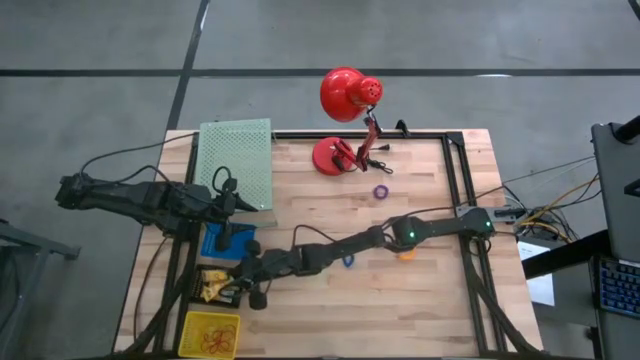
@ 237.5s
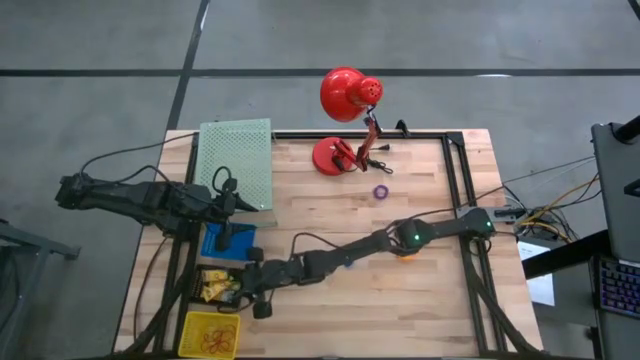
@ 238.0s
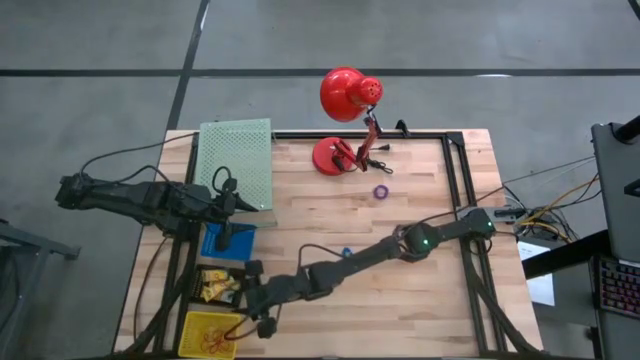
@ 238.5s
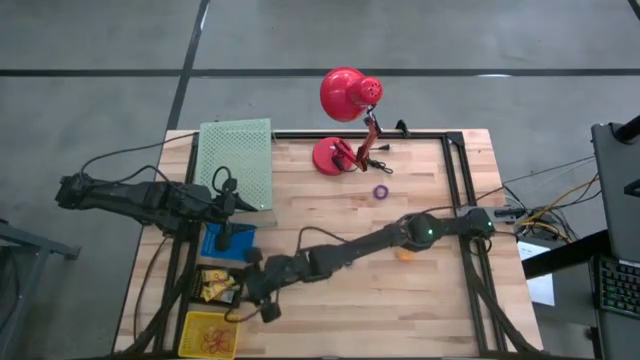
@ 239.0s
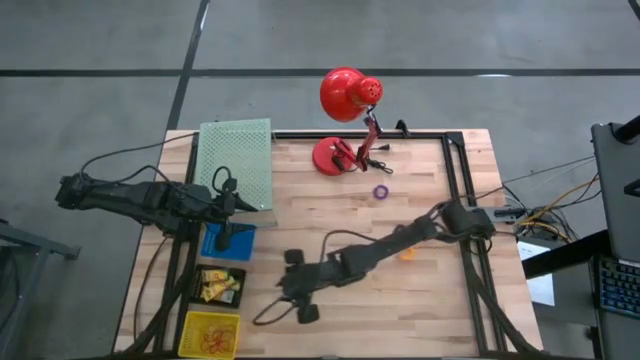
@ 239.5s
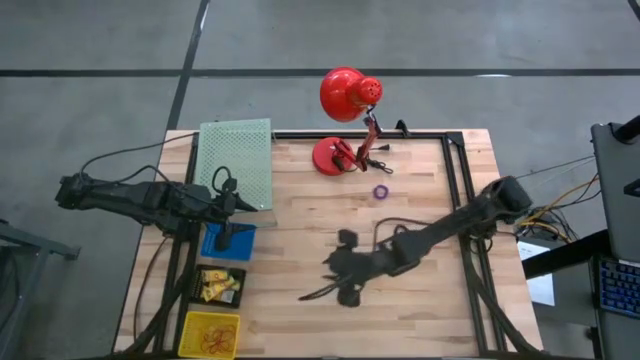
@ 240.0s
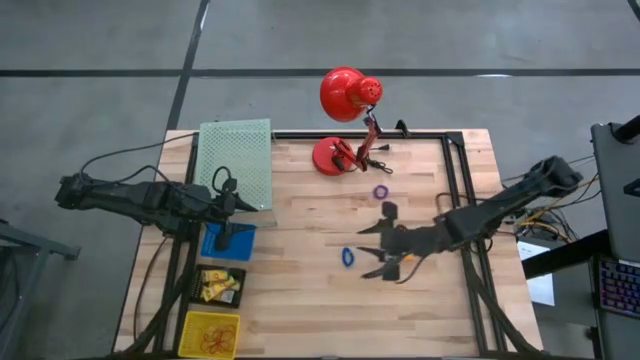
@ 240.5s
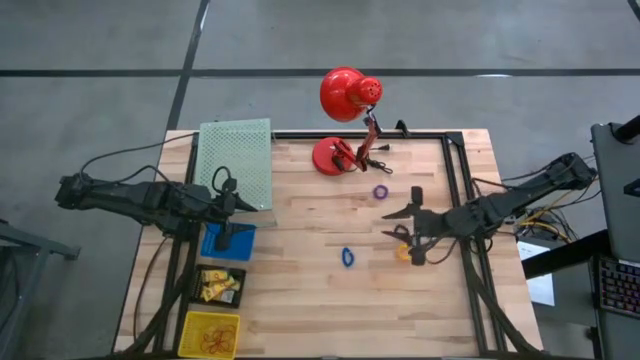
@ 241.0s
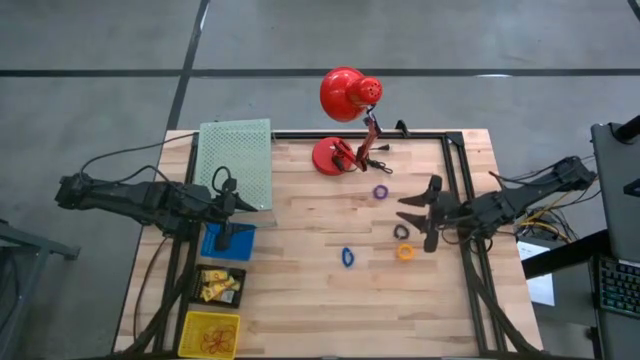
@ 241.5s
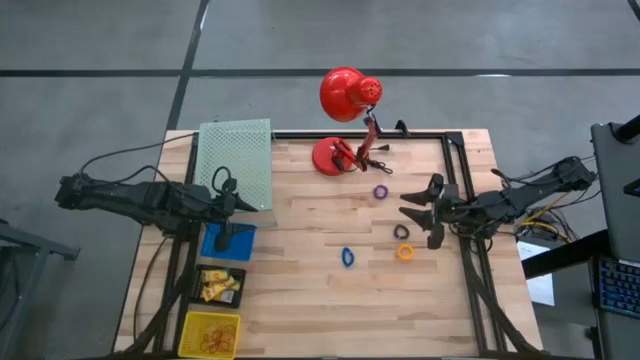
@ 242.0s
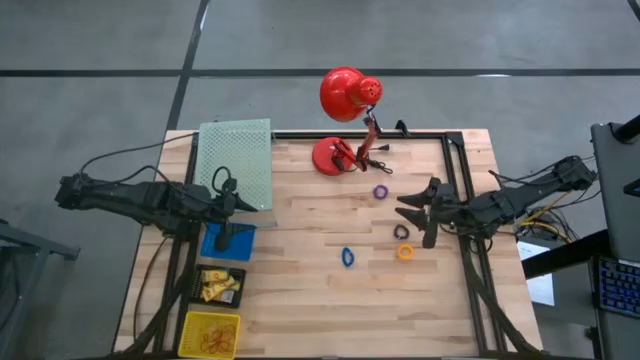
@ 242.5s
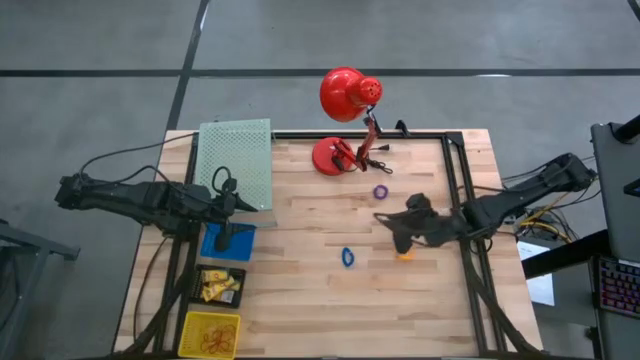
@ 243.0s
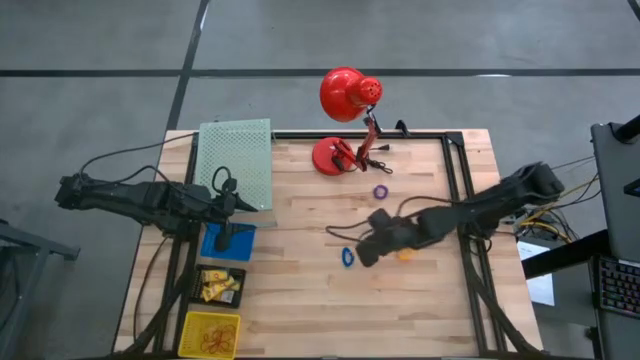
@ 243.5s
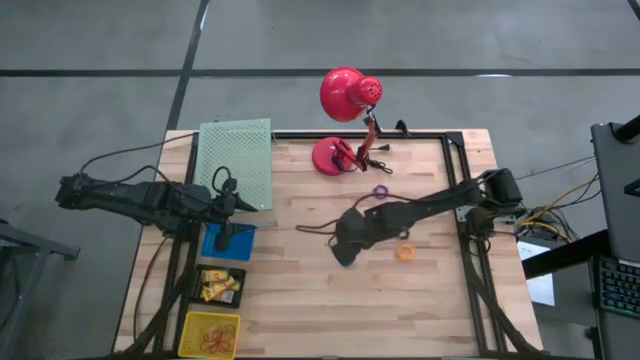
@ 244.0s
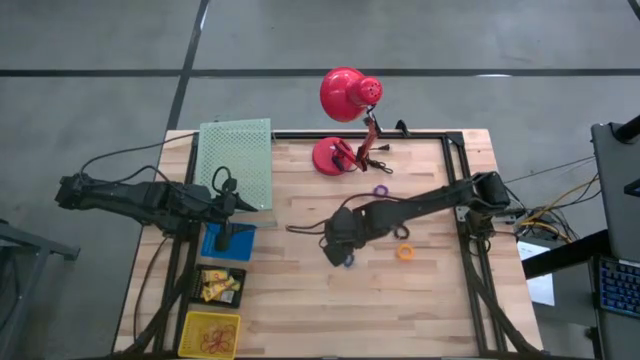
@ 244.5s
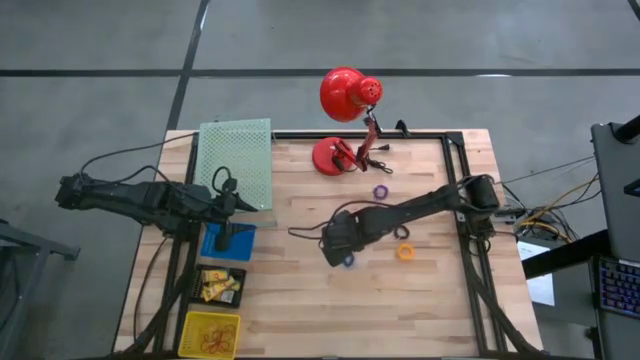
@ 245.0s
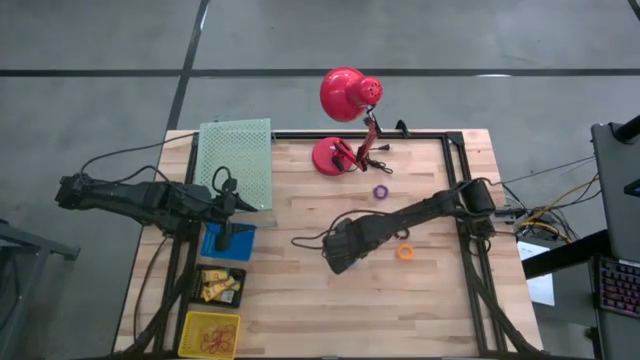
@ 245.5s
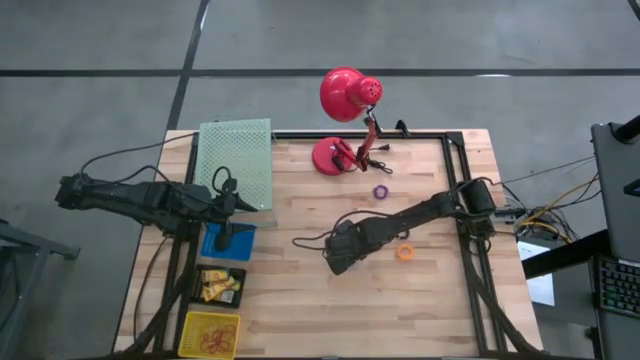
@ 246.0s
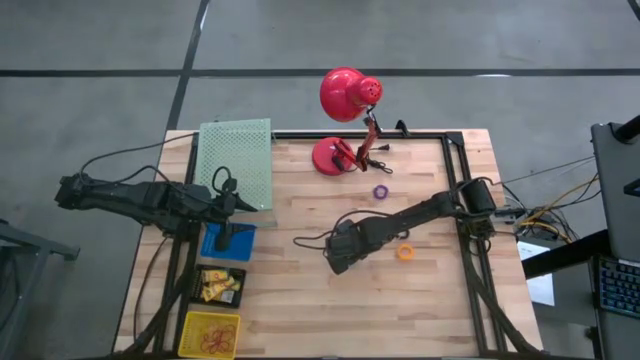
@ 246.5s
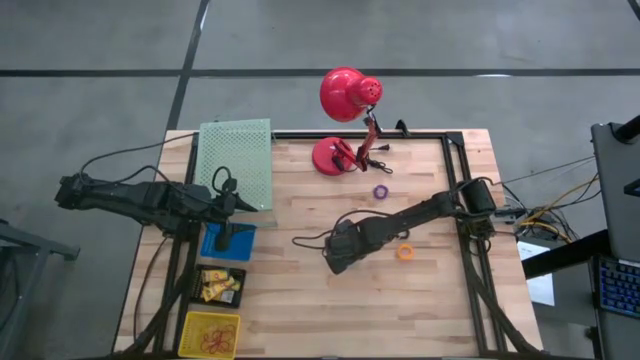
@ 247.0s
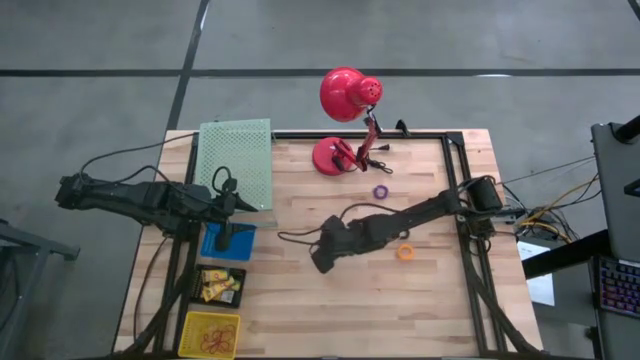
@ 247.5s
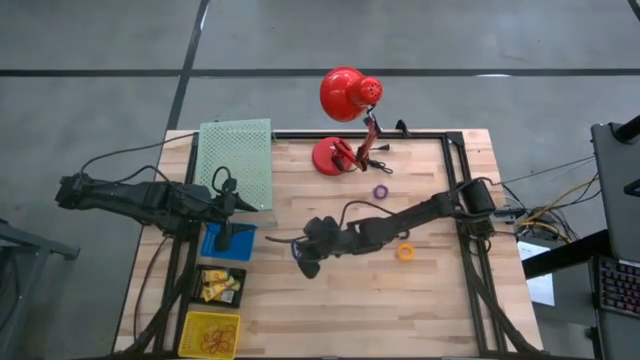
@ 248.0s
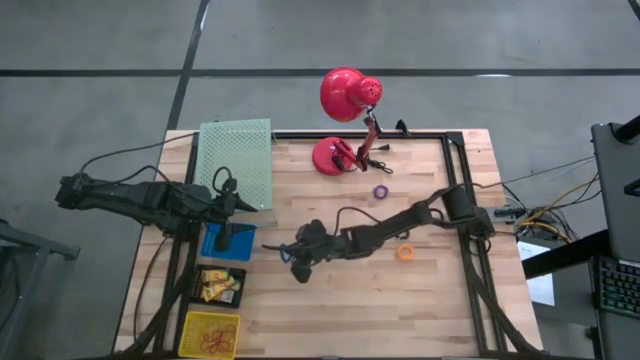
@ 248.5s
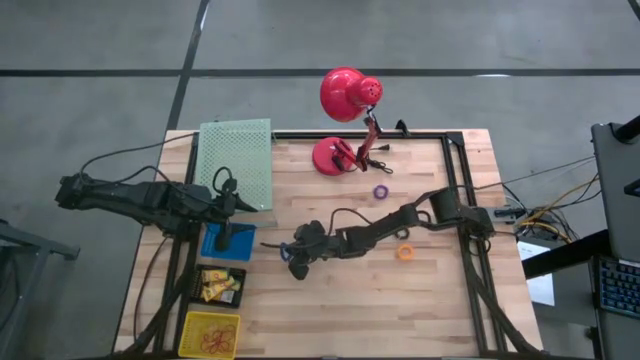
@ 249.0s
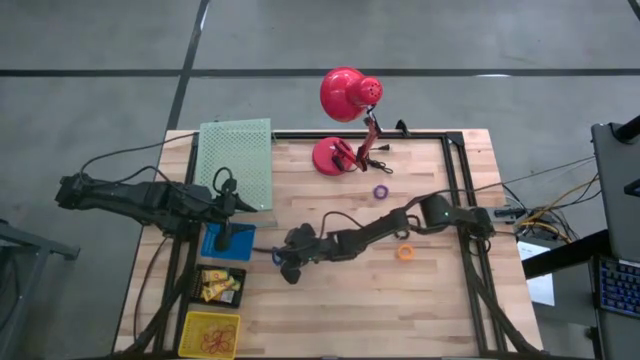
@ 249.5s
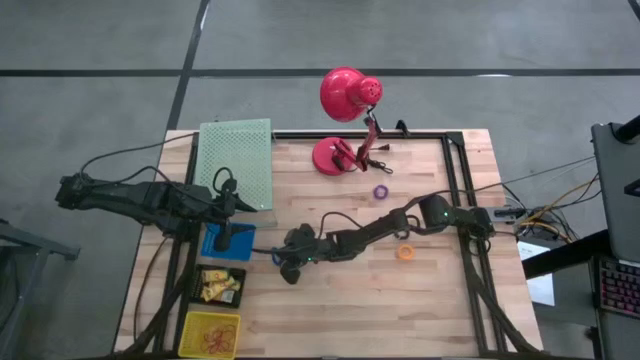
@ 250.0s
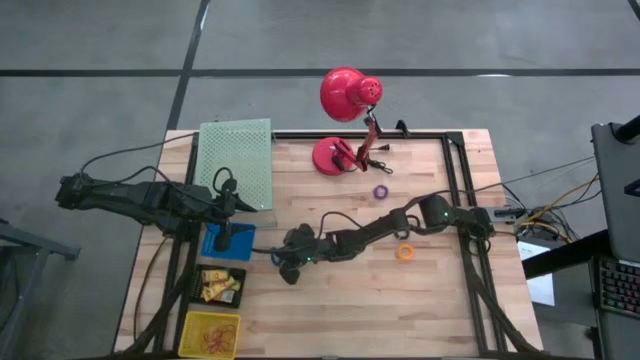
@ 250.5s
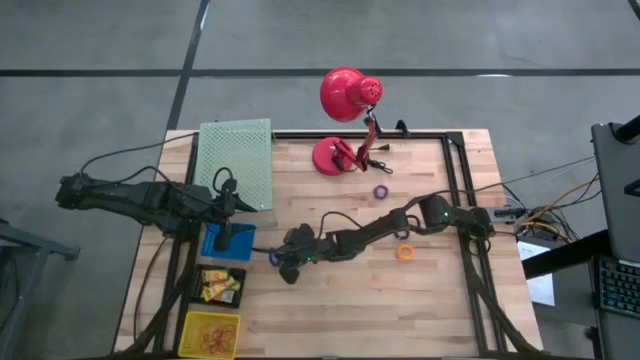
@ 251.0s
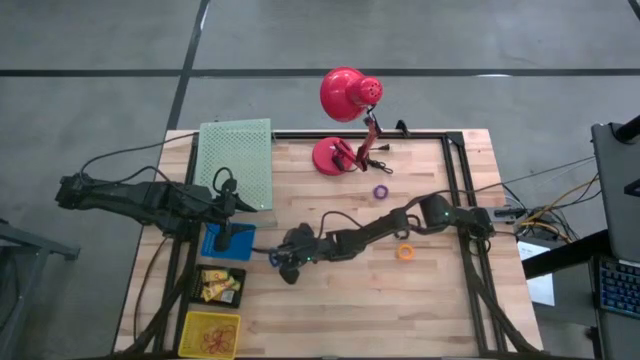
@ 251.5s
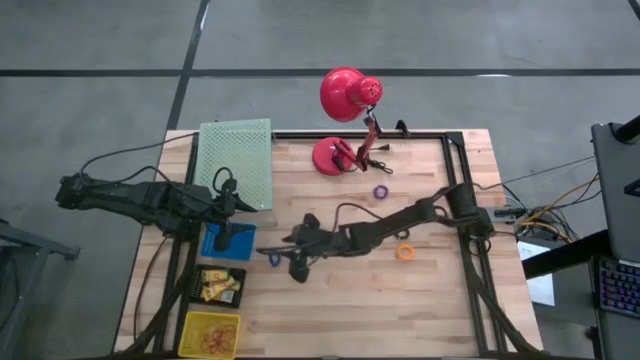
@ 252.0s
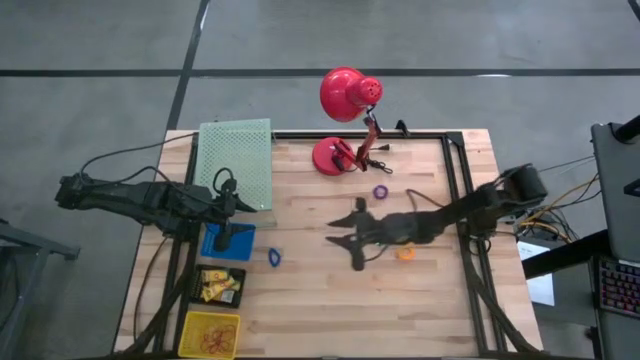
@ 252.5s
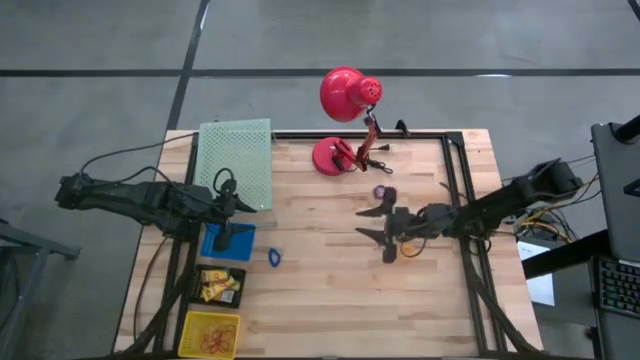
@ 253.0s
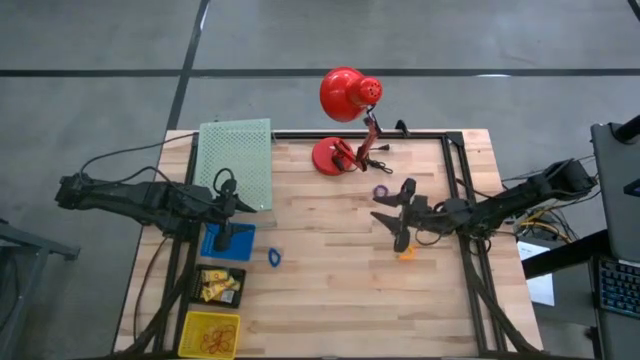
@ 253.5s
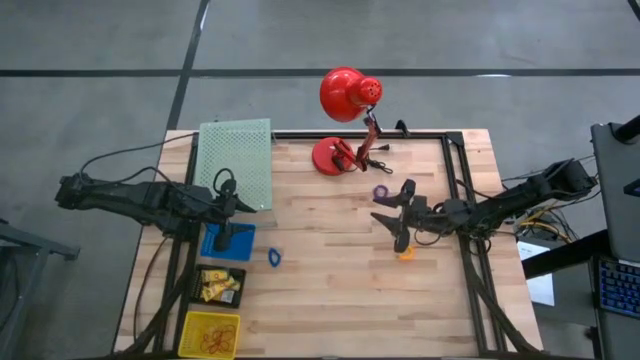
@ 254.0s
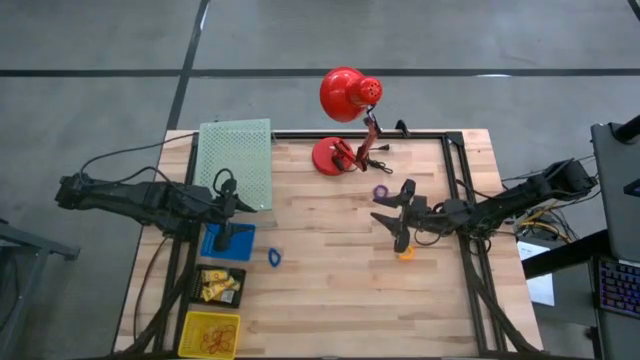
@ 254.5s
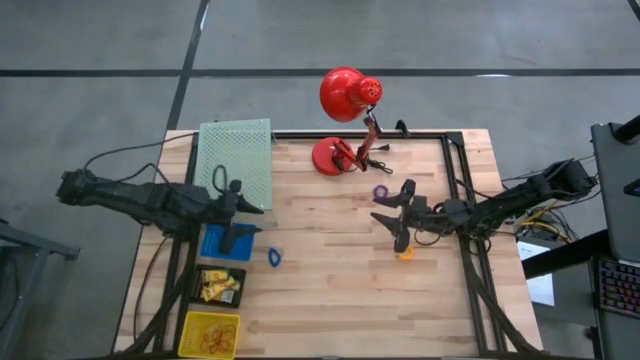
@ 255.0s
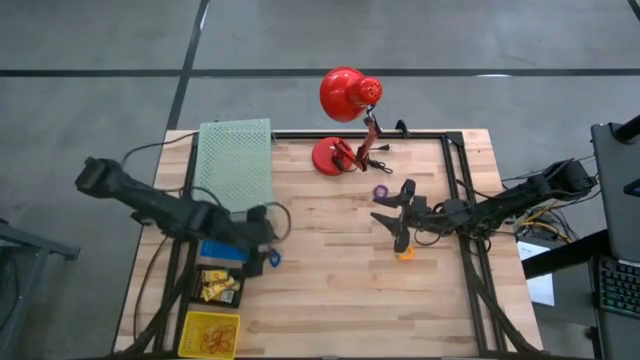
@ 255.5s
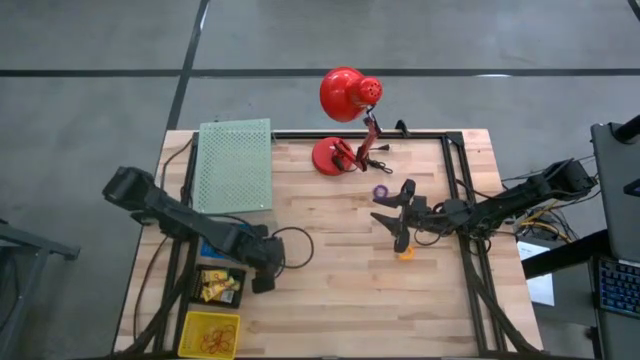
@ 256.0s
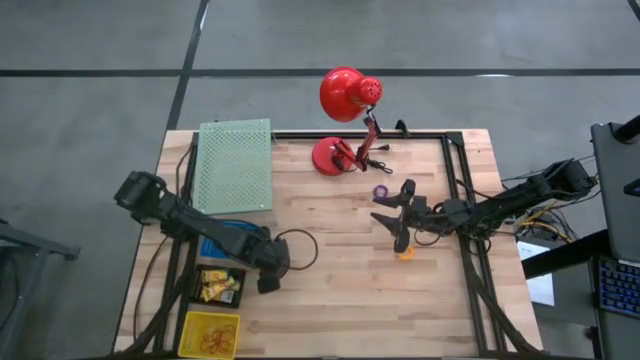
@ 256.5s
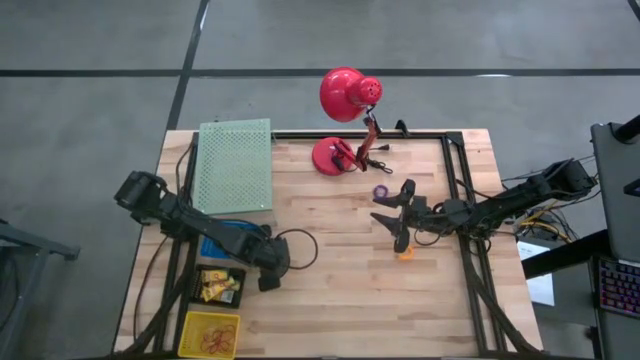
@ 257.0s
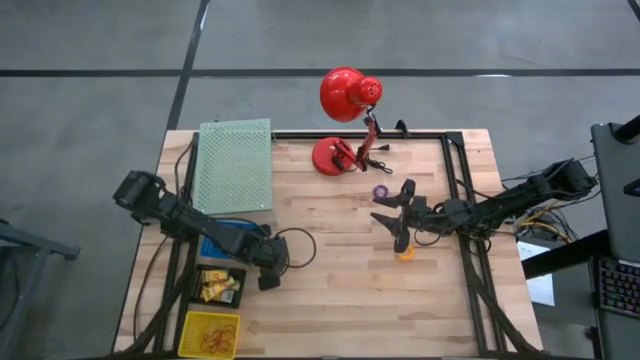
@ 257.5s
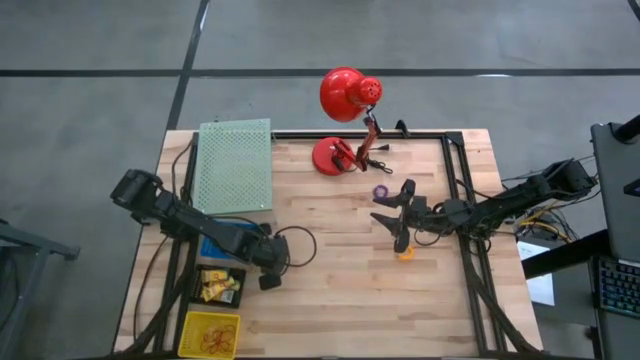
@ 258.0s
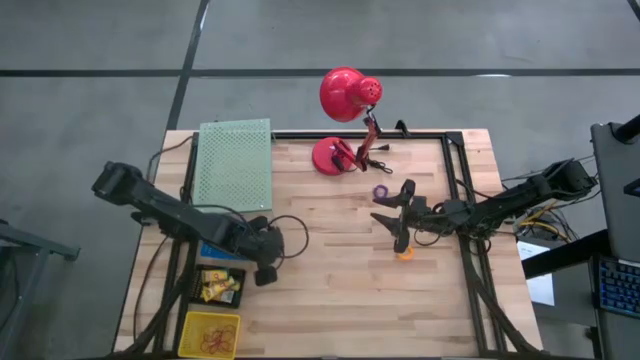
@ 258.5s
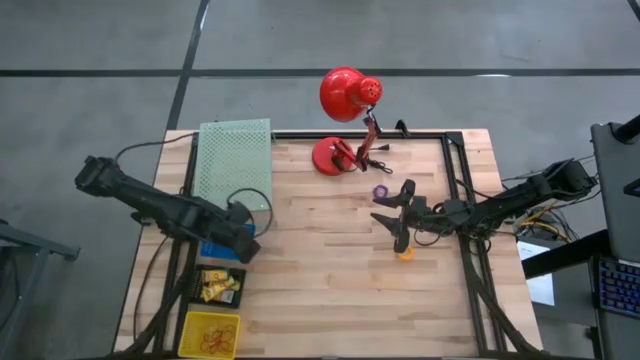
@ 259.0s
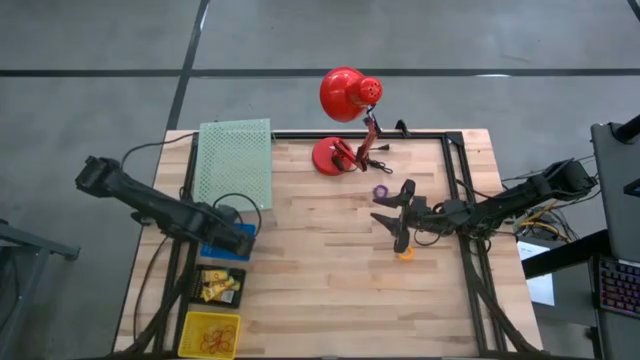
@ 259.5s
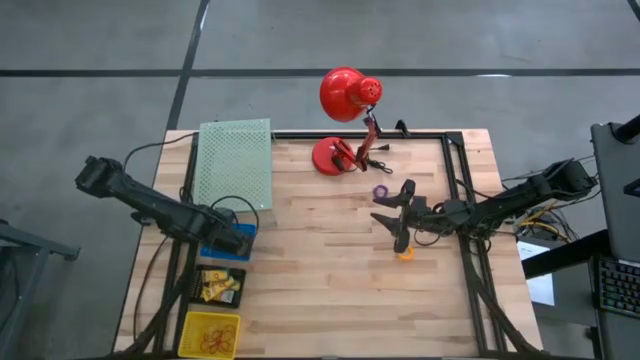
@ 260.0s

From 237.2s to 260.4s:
Task: Pick & Place Office Desk Supplies
Put the blue spring rubber band into the blue bin
